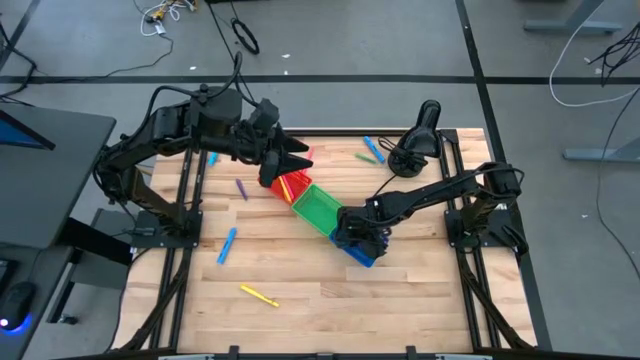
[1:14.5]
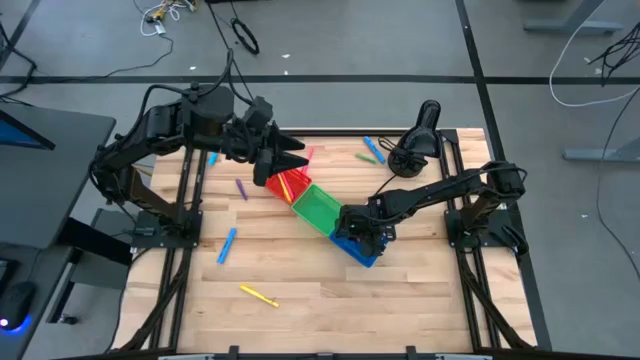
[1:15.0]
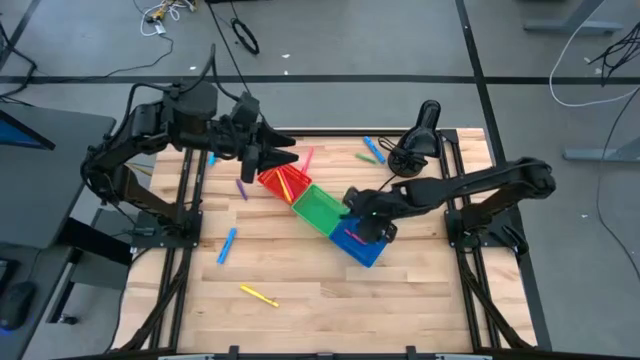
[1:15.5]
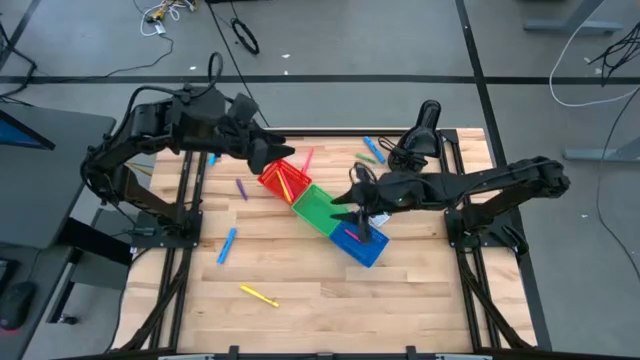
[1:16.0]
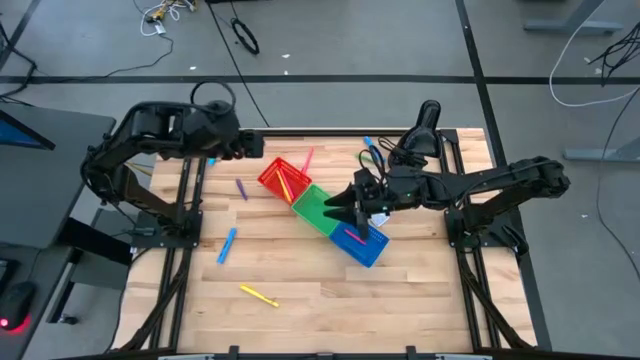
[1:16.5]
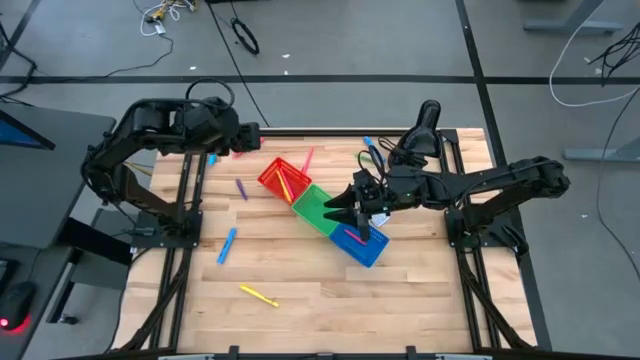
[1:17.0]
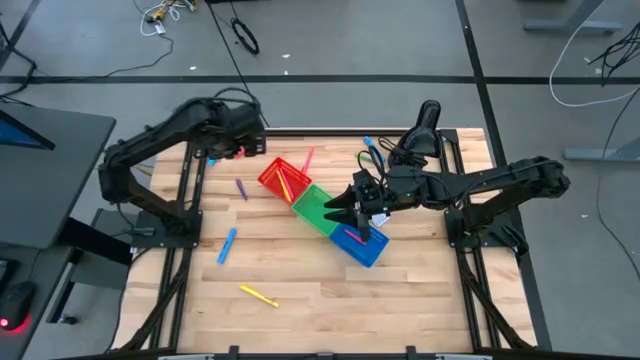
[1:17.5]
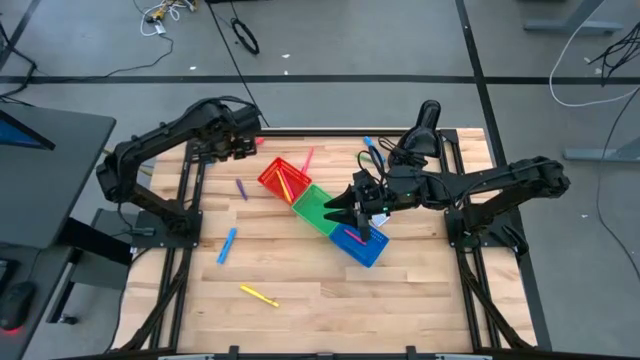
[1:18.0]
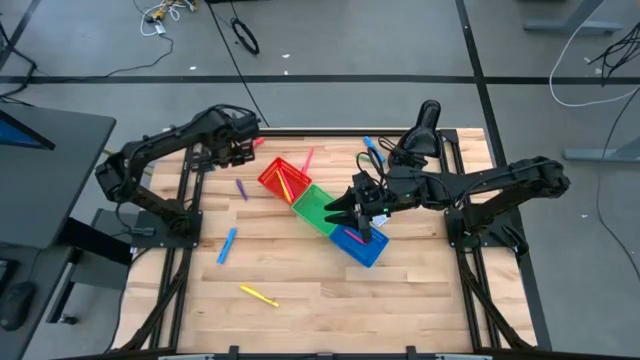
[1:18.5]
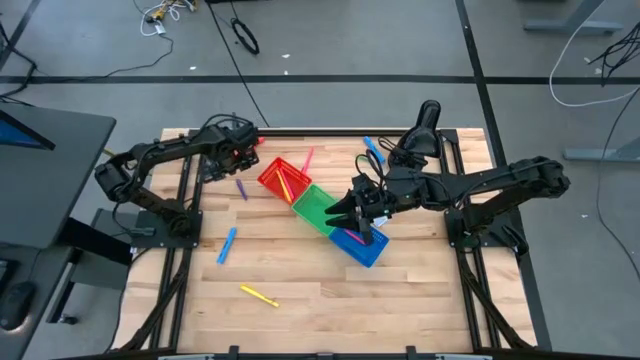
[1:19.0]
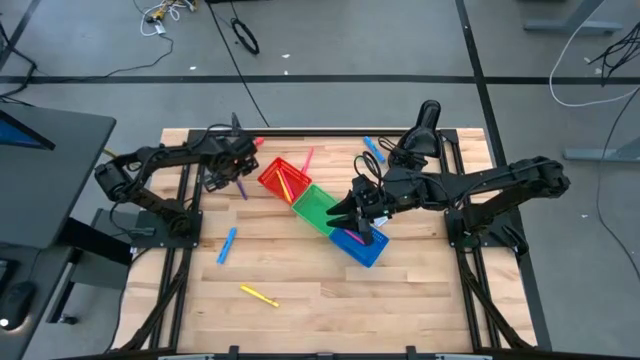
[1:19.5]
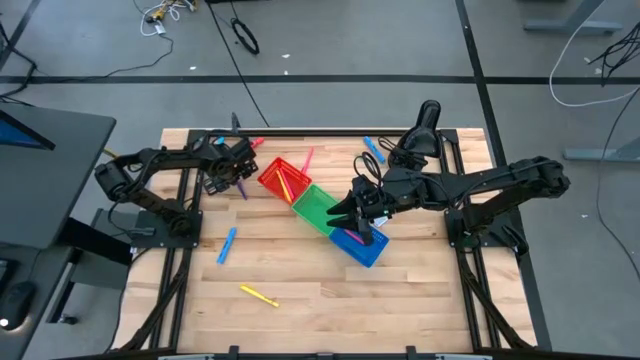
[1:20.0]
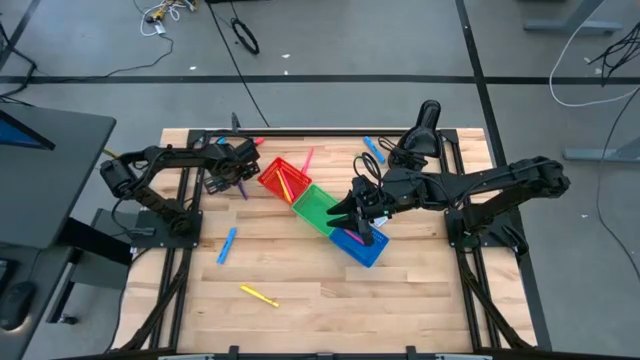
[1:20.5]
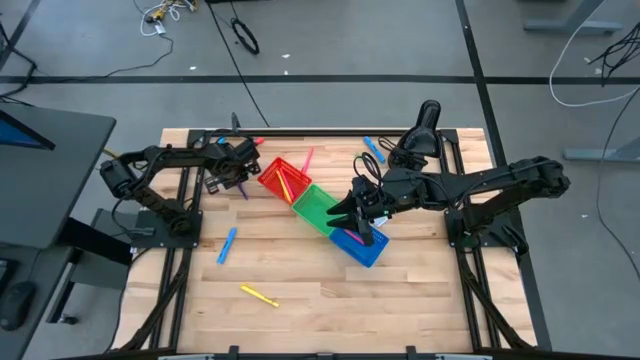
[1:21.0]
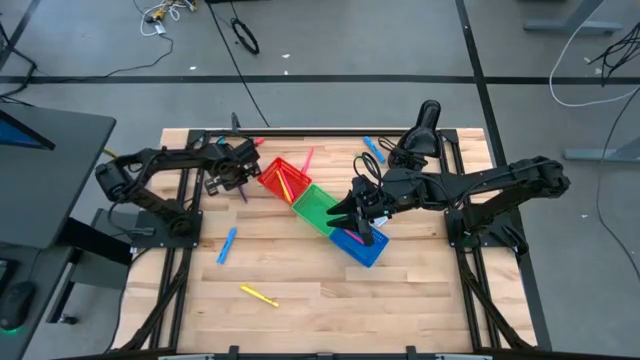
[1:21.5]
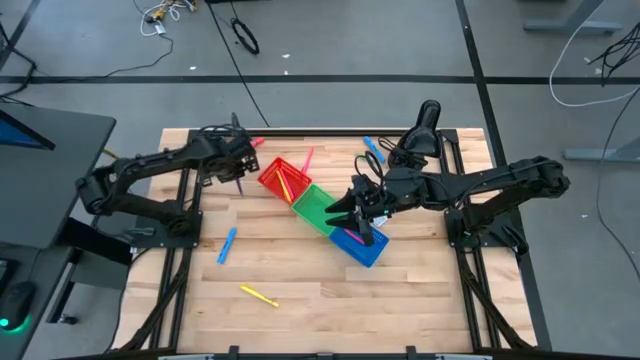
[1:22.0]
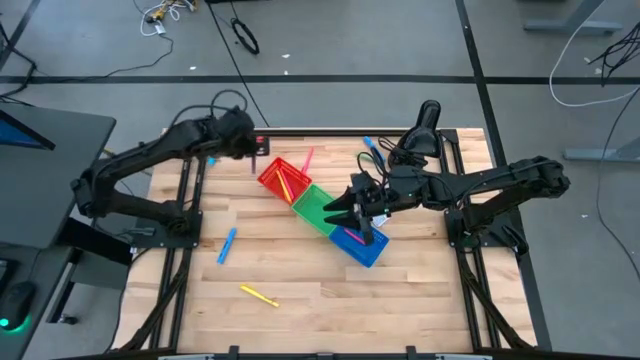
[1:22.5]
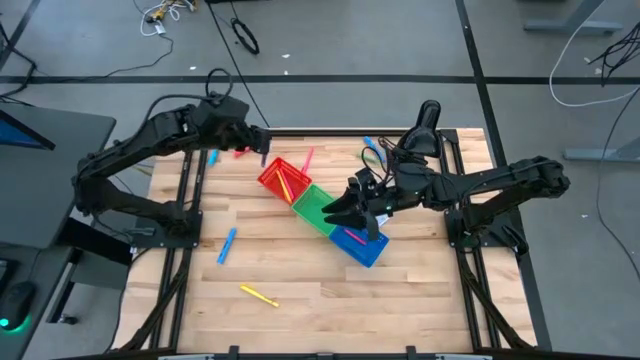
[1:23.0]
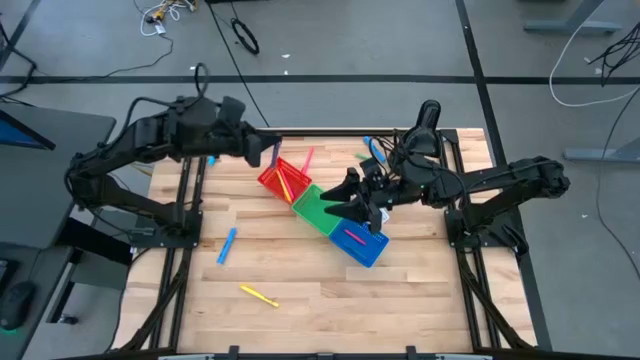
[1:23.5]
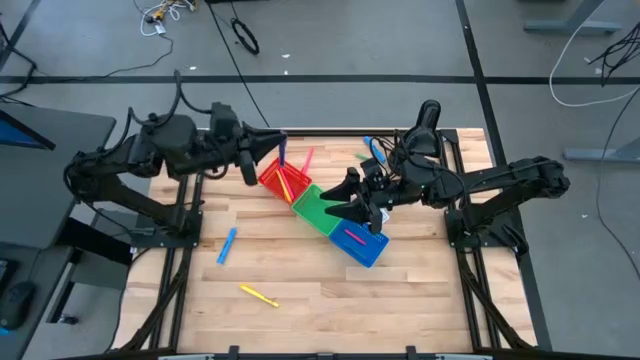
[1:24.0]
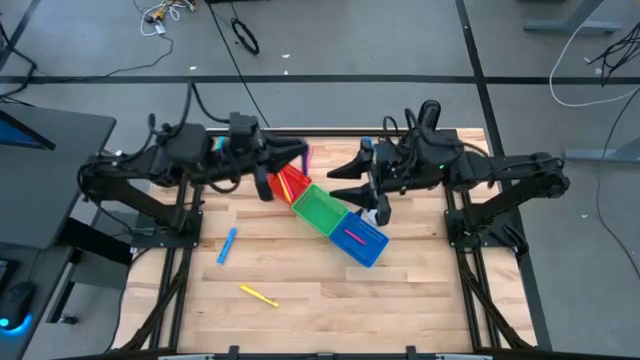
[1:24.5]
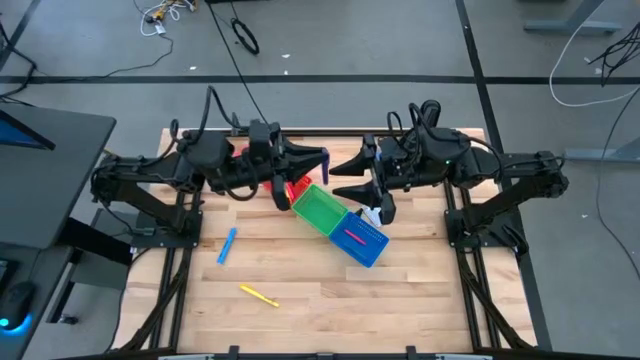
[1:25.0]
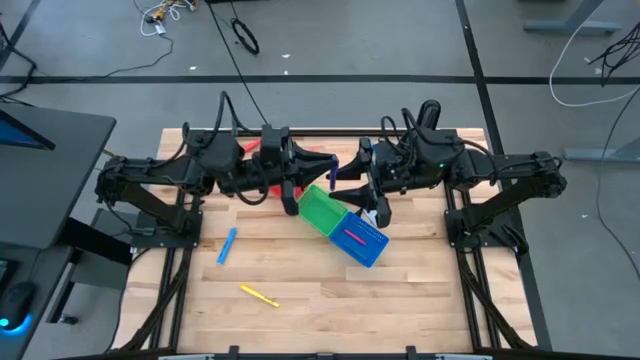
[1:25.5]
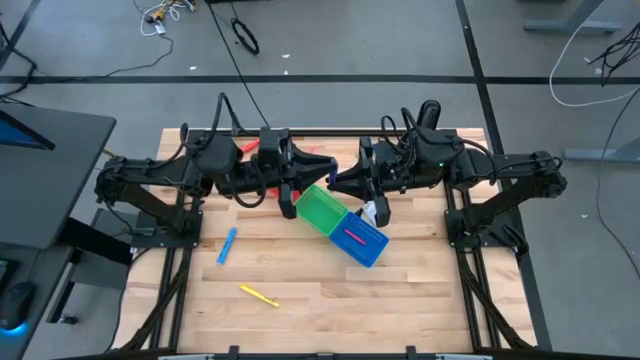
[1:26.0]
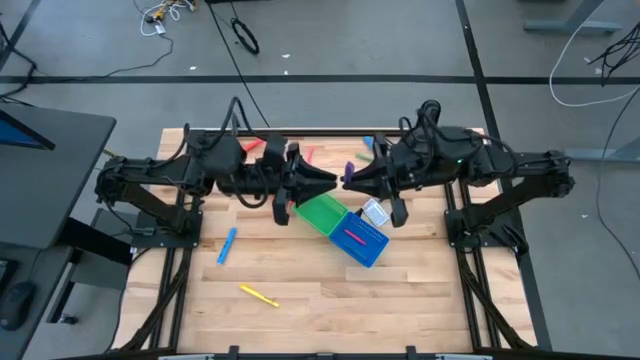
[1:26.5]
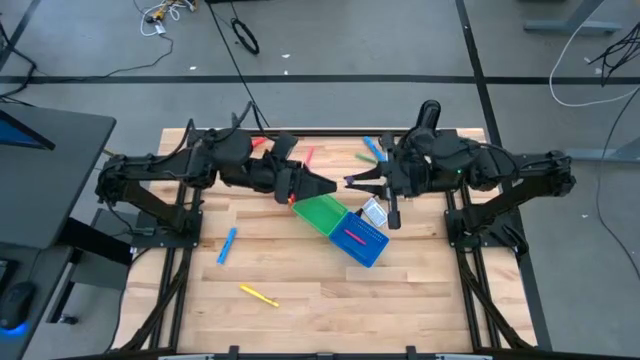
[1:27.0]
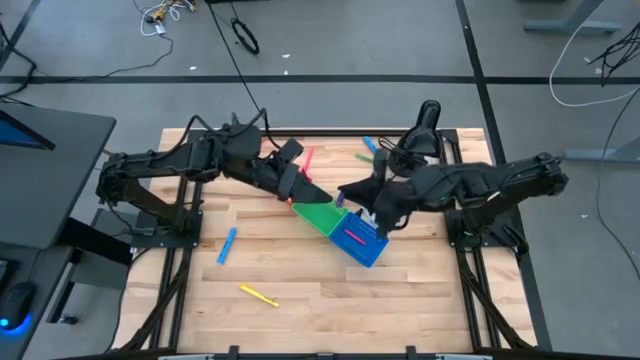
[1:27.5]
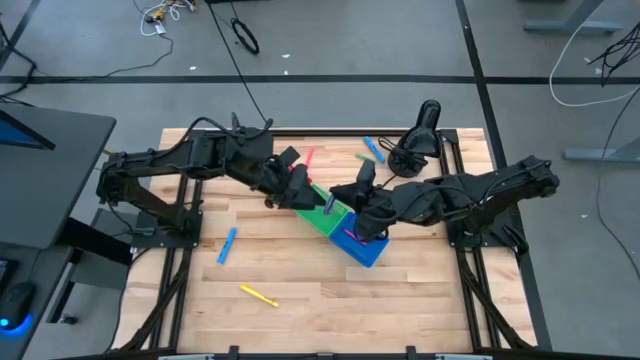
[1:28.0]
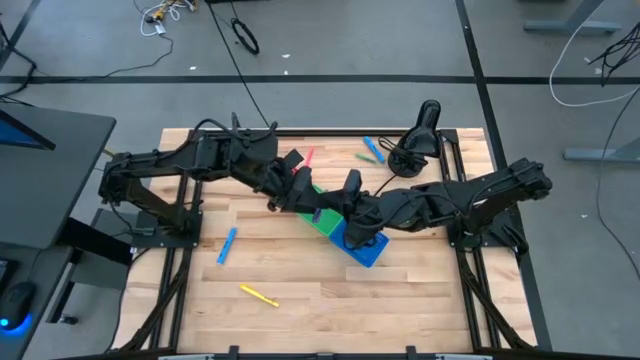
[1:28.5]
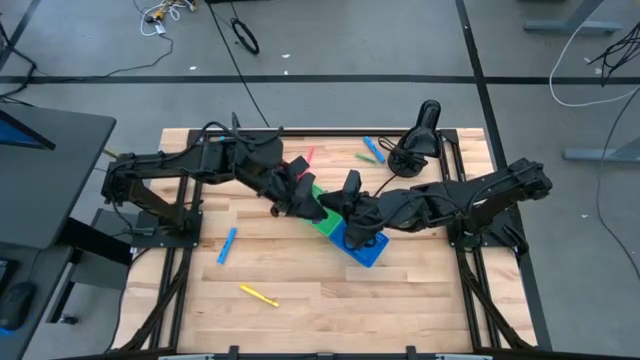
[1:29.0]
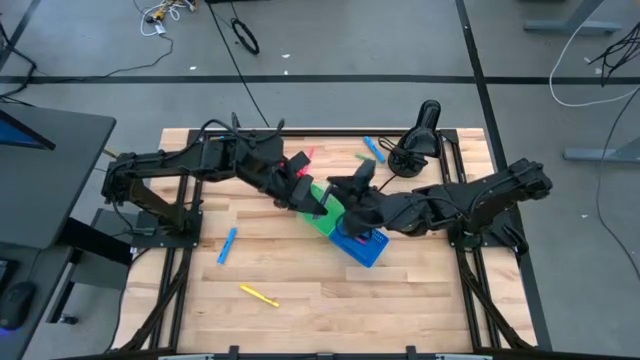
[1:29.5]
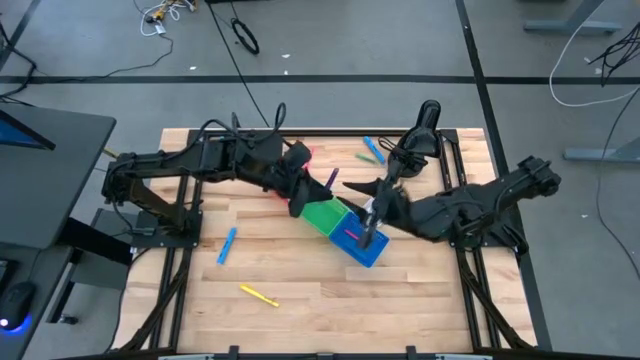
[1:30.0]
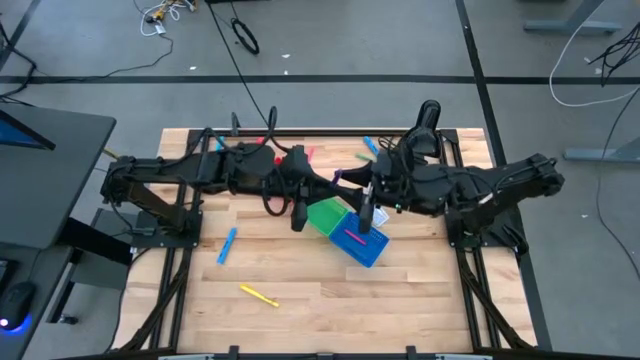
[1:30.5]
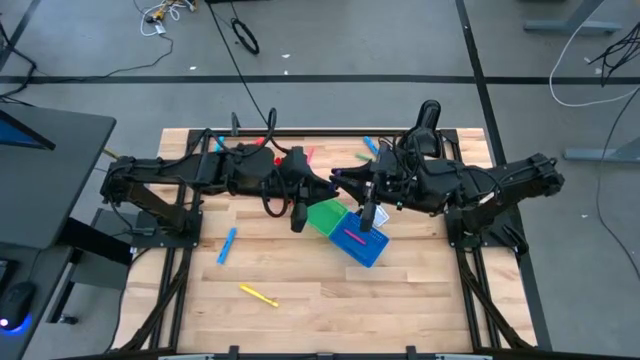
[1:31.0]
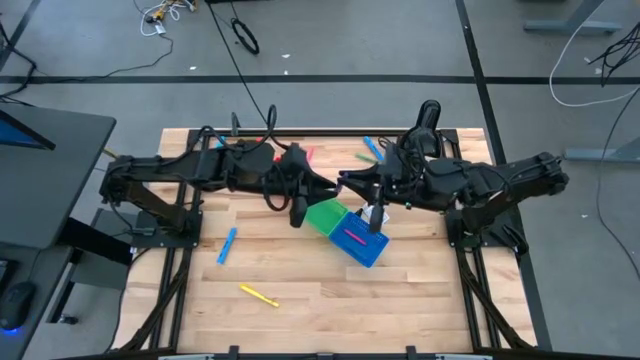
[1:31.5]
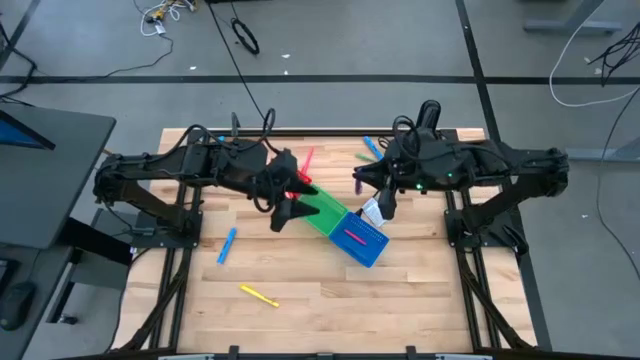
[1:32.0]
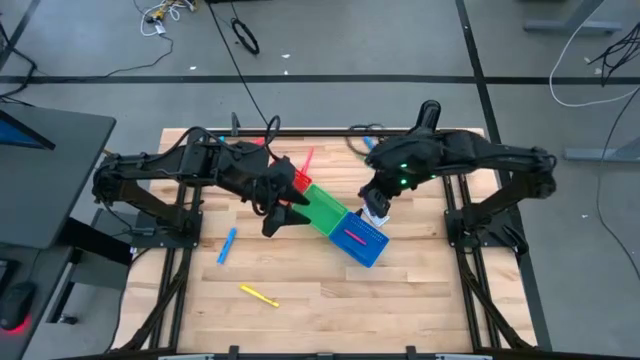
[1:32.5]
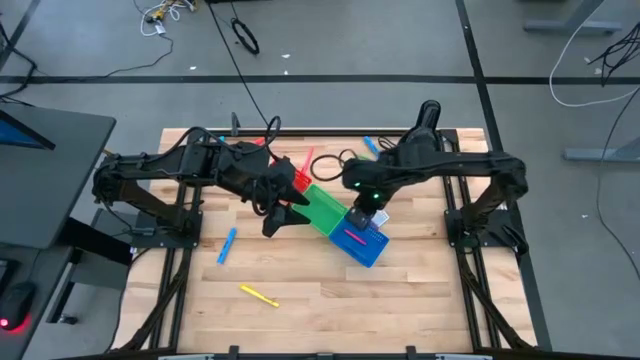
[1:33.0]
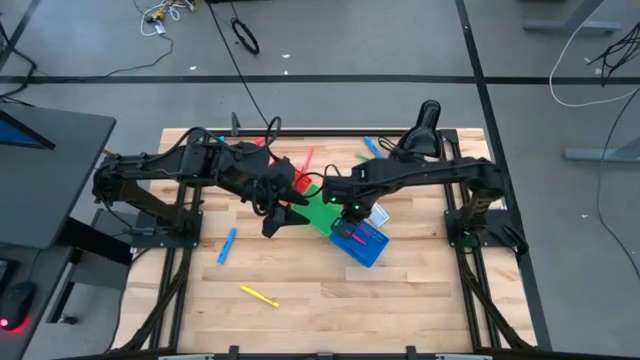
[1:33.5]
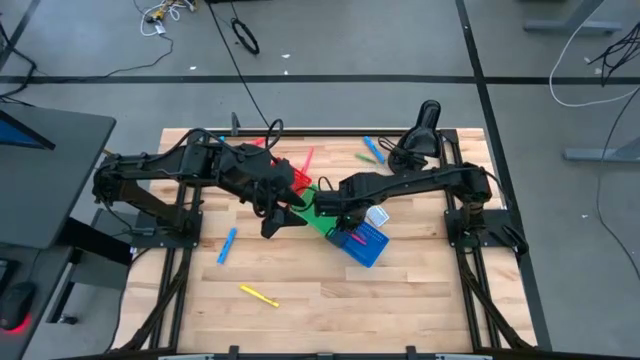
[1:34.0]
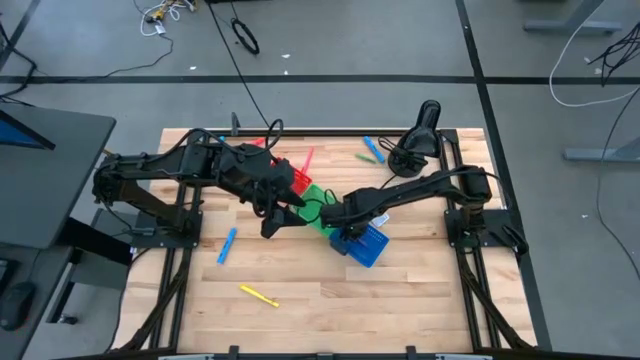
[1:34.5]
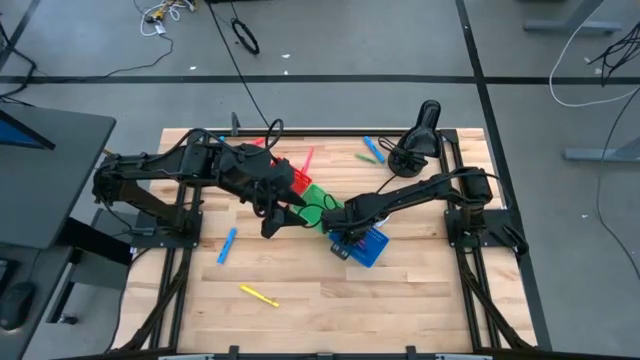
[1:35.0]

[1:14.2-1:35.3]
Task: Pick & Place Markers
Put the purple pen into the blue bin
